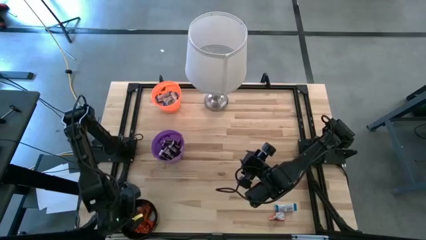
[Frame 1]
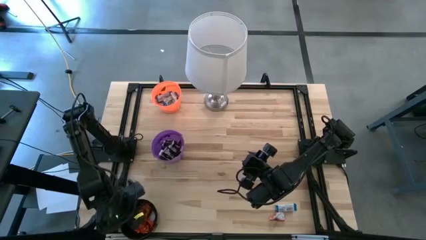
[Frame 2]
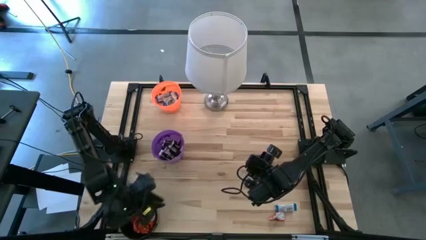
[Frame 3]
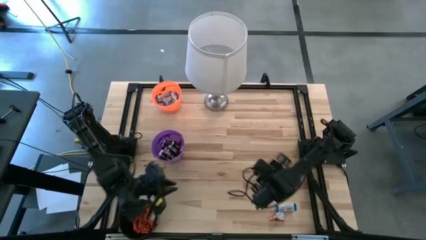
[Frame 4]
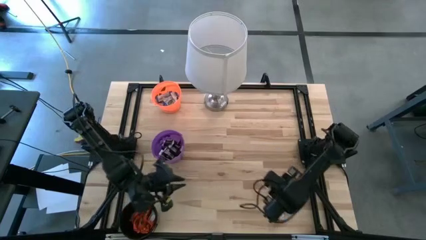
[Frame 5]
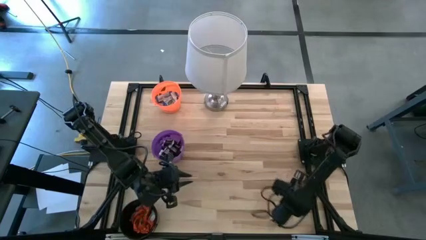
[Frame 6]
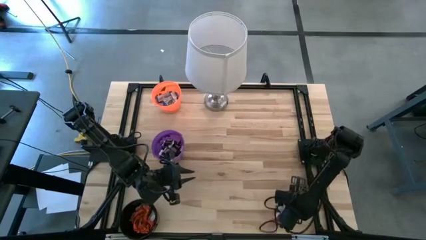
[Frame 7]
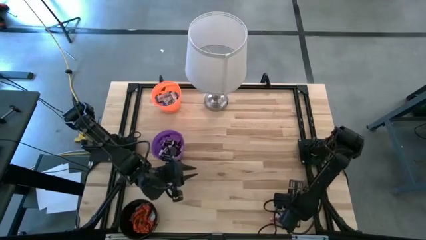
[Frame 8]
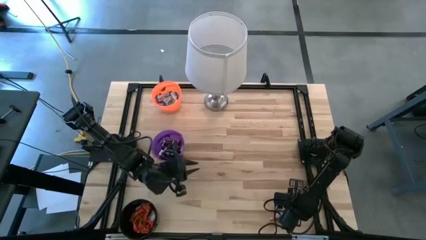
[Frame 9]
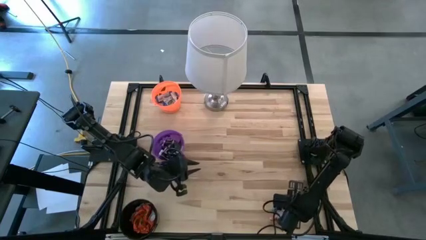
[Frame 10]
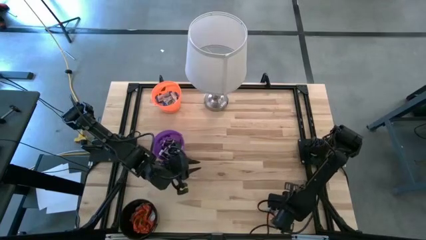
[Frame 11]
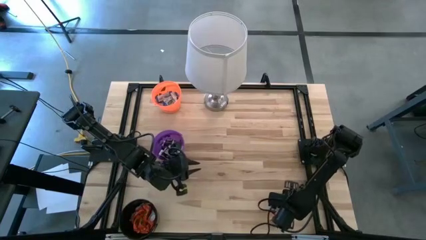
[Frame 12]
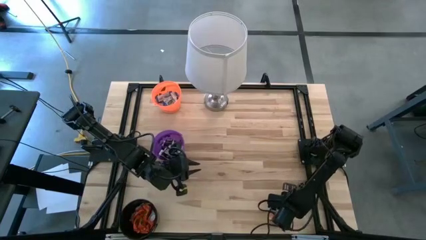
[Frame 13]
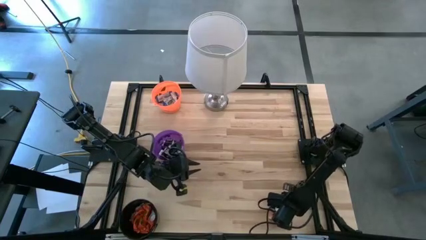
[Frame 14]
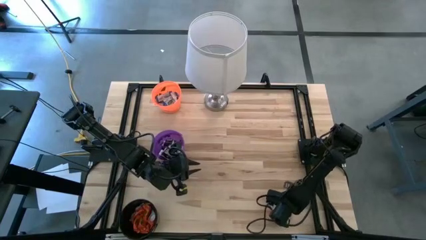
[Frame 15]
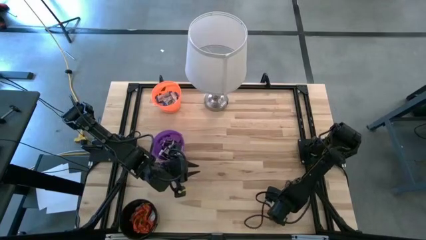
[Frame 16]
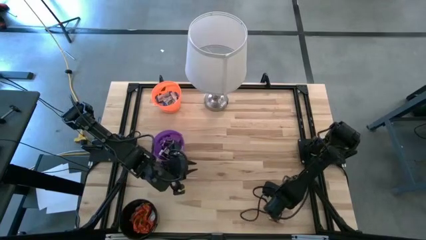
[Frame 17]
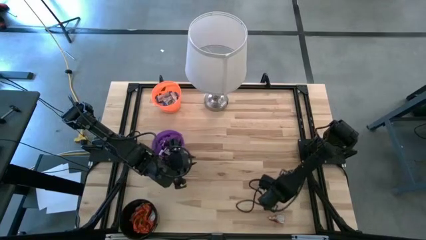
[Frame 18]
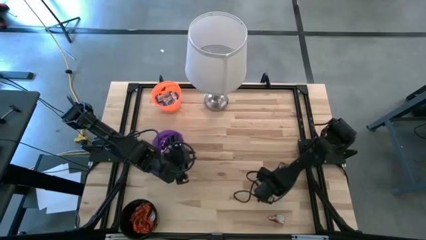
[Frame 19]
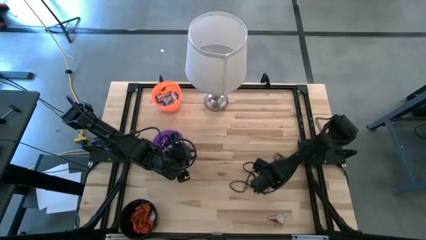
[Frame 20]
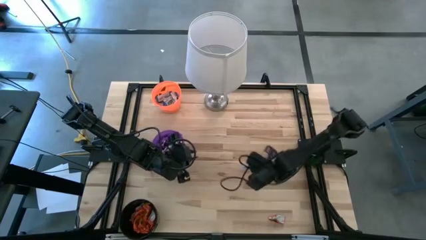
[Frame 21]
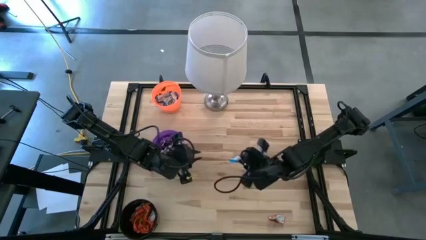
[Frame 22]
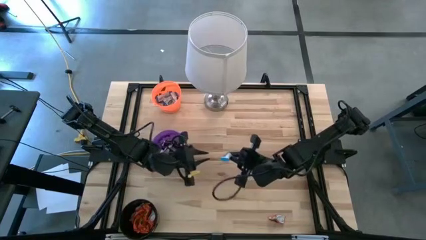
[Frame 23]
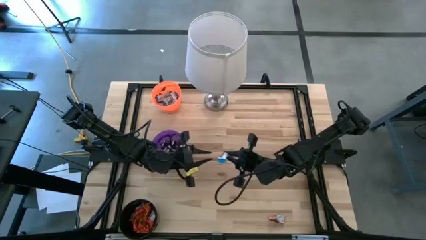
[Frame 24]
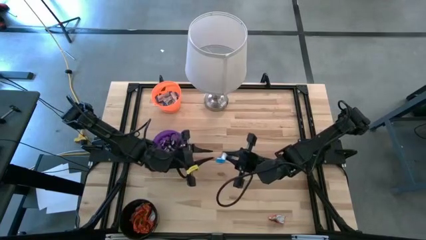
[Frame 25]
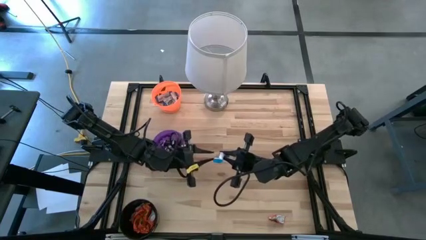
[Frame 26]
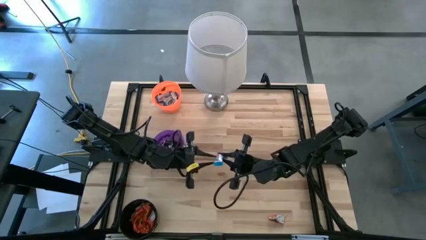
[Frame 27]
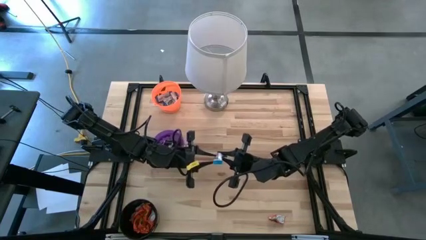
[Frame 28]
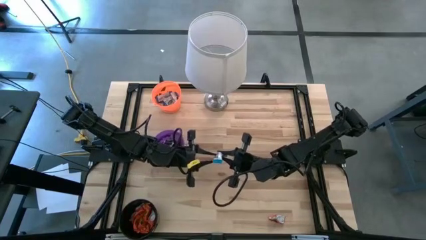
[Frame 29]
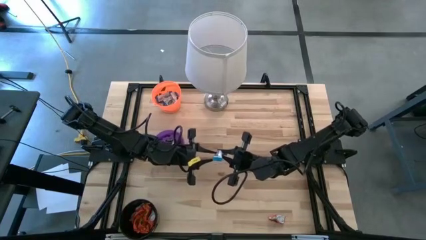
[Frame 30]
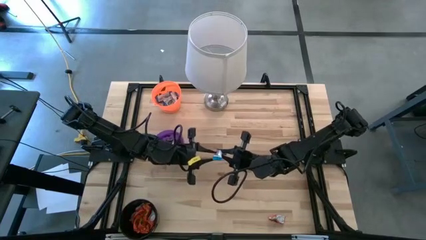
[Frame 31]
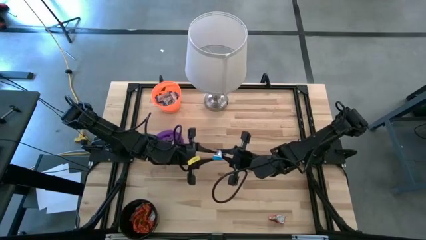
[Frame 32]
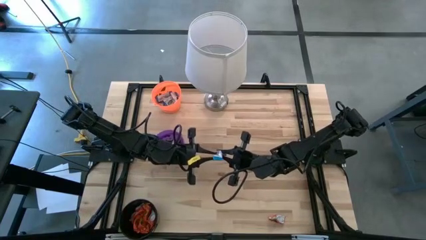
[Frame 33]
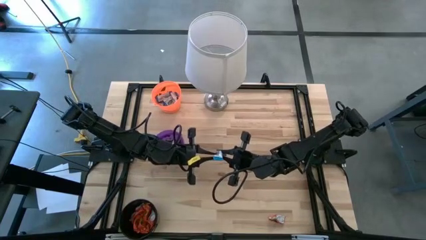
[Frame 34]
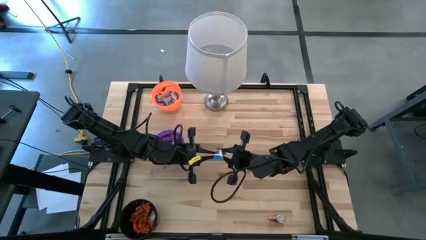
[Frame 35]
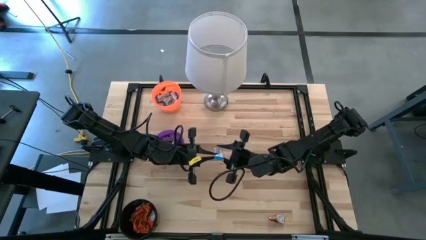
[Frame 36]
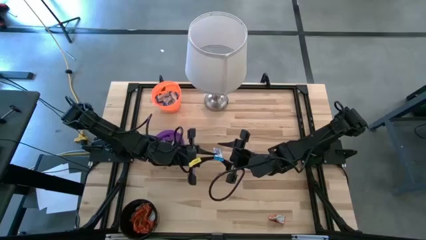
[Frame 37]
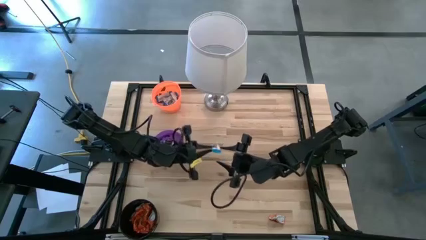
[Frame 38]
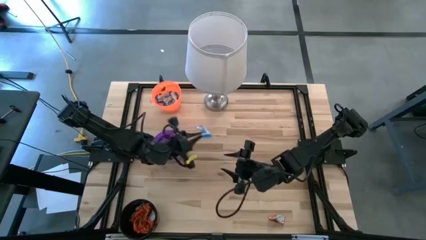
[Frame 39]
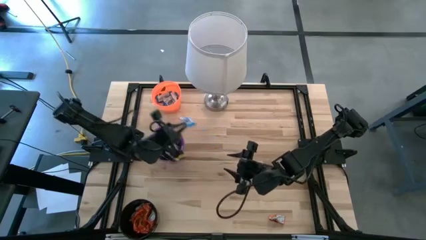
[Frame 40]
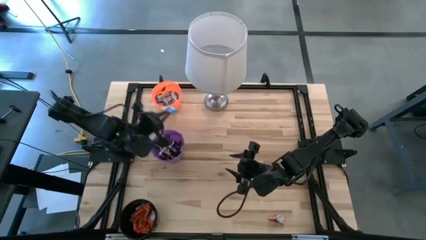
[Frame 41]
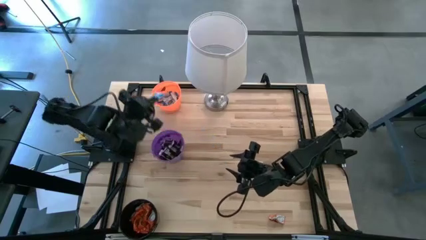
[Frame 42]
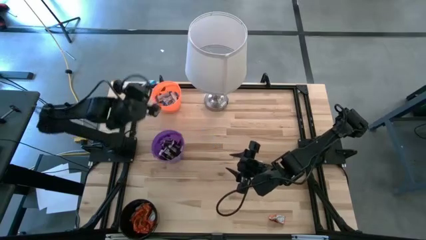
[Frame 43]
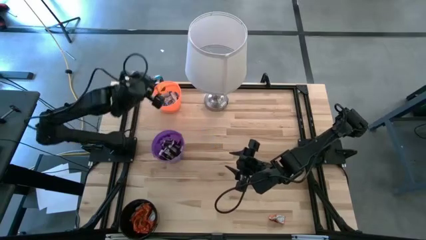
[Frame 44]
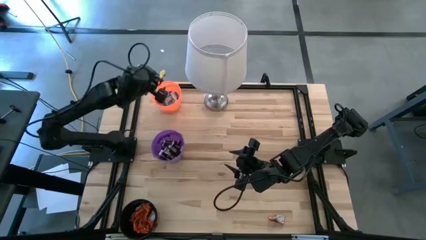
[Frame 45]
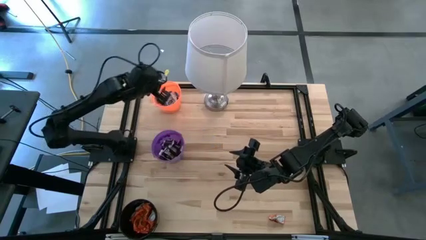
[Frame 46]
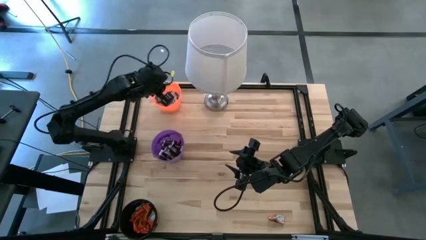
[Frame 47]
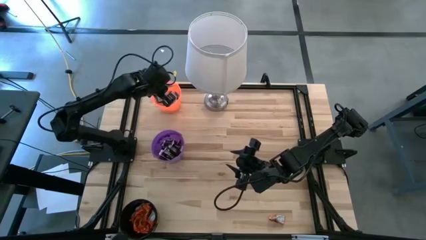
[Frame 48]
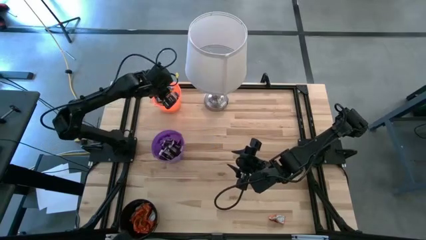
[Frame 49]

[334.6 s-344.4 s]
Task: Sort candy
Put the white chocolate into the orange bucket

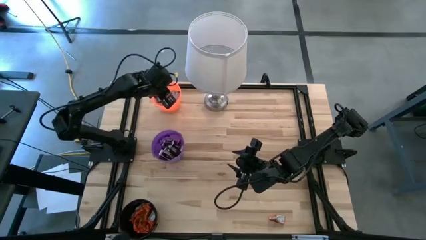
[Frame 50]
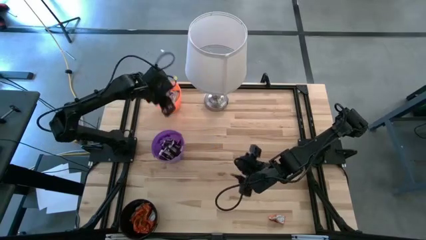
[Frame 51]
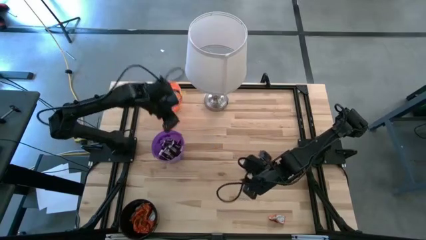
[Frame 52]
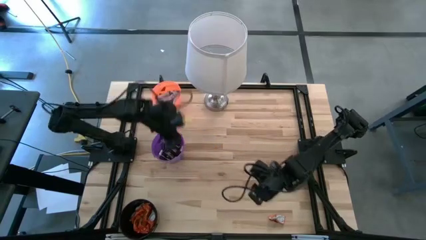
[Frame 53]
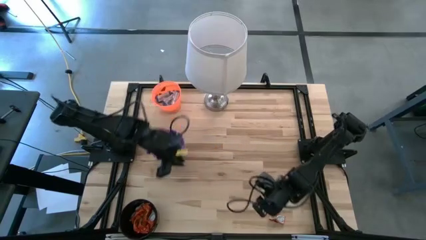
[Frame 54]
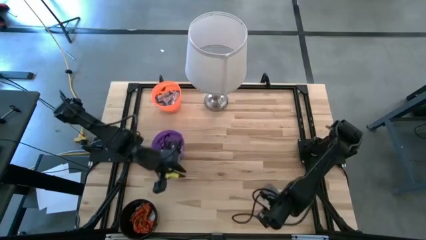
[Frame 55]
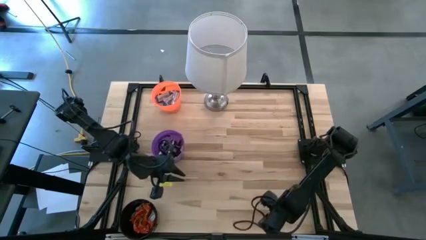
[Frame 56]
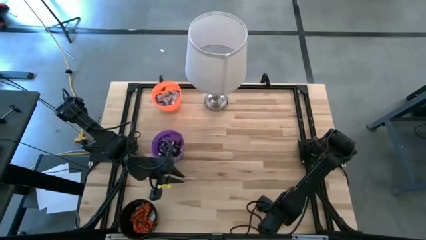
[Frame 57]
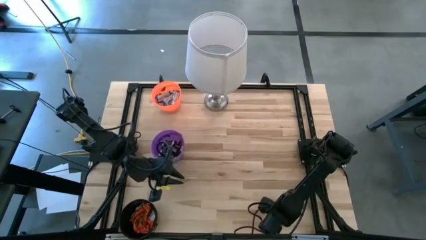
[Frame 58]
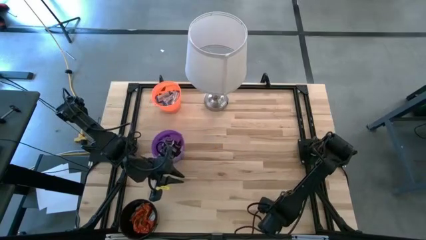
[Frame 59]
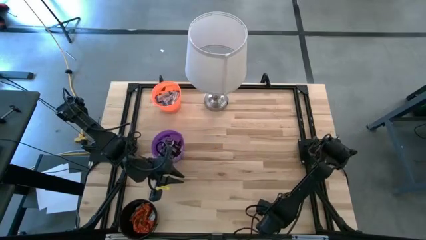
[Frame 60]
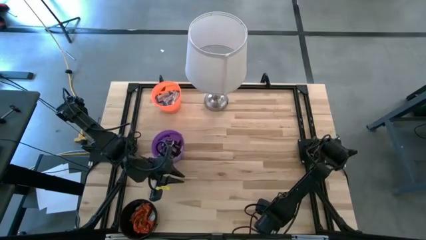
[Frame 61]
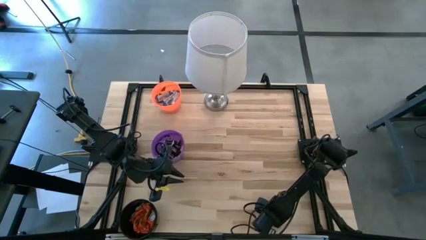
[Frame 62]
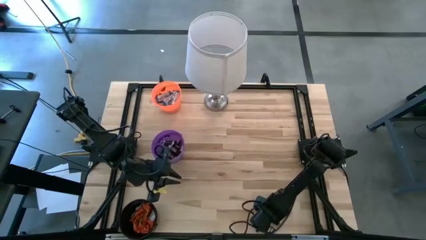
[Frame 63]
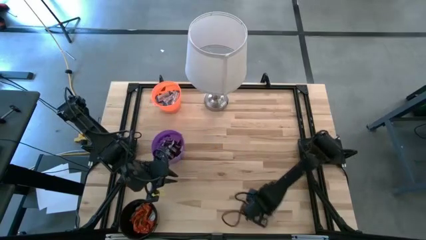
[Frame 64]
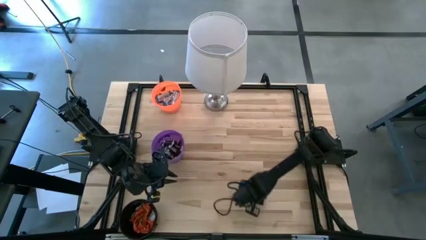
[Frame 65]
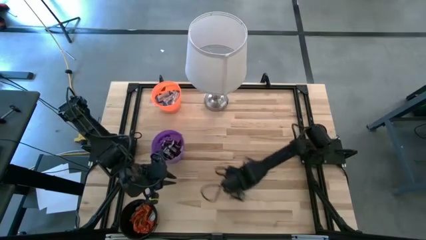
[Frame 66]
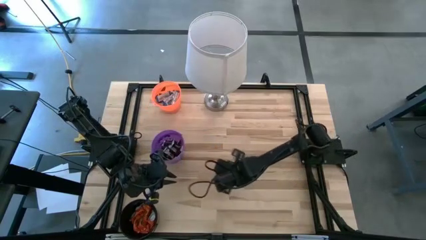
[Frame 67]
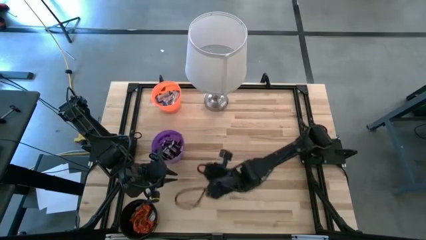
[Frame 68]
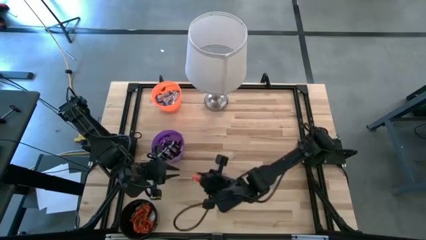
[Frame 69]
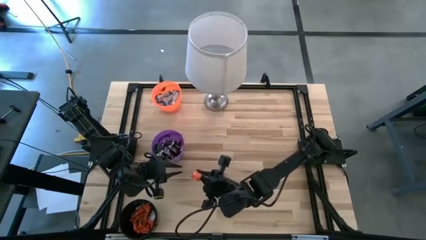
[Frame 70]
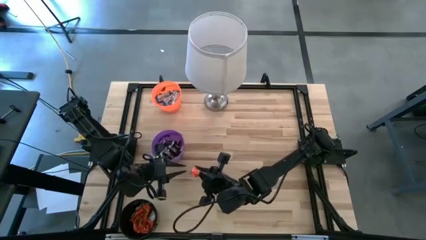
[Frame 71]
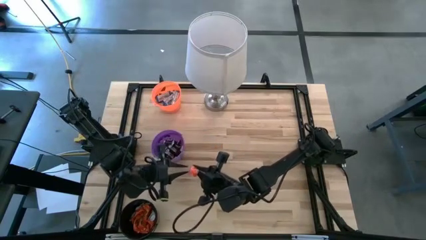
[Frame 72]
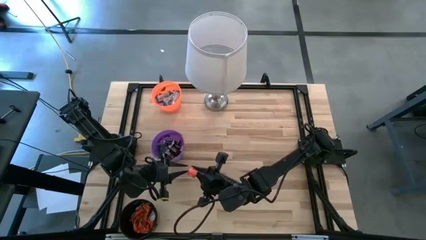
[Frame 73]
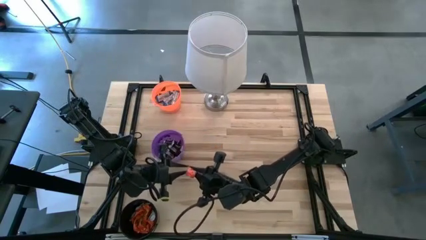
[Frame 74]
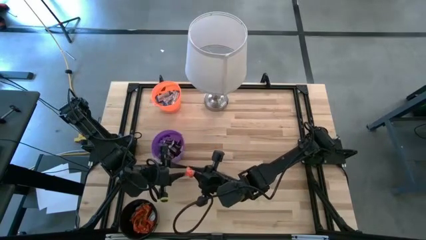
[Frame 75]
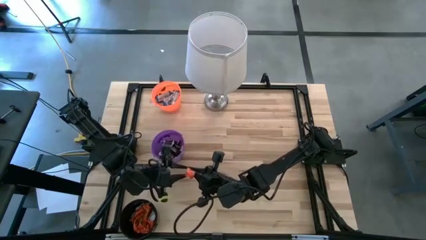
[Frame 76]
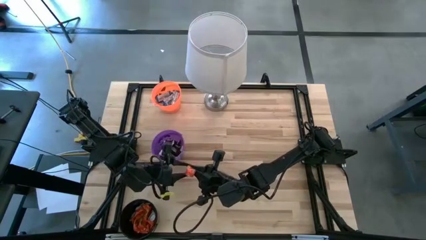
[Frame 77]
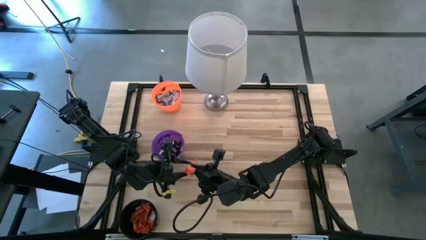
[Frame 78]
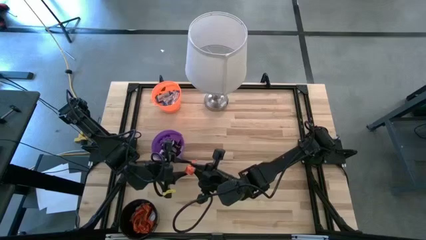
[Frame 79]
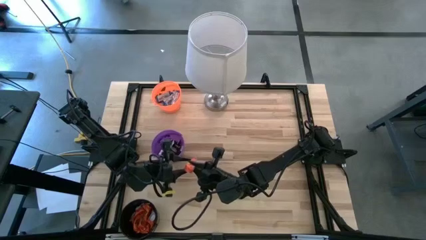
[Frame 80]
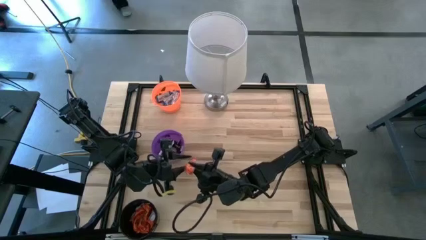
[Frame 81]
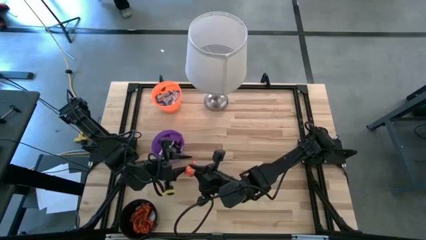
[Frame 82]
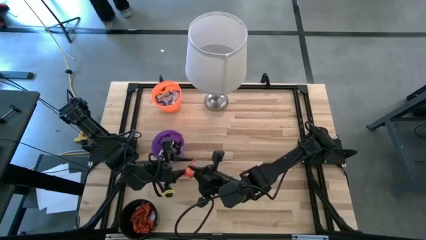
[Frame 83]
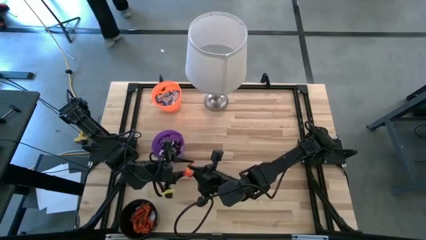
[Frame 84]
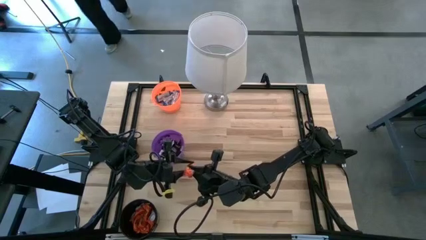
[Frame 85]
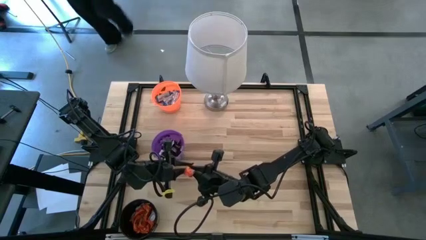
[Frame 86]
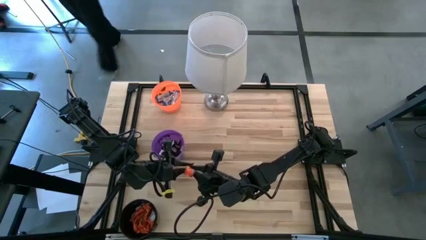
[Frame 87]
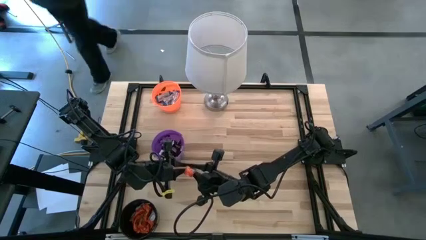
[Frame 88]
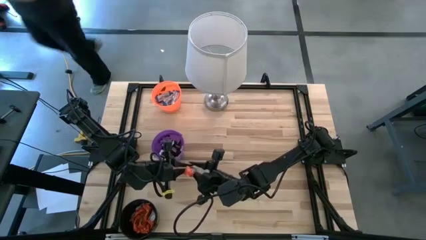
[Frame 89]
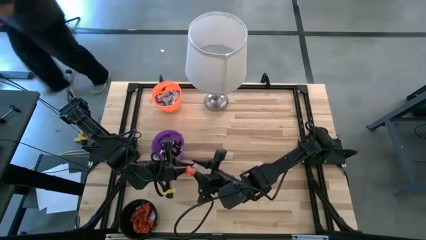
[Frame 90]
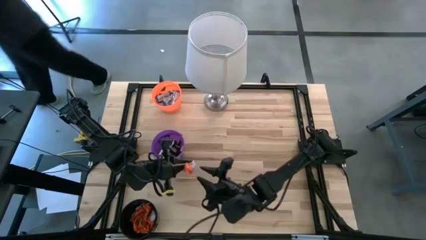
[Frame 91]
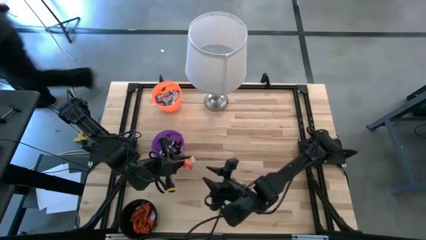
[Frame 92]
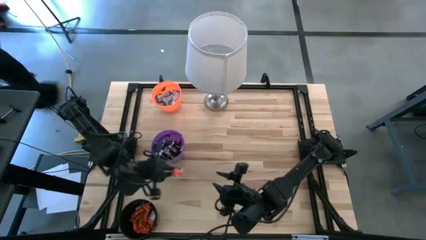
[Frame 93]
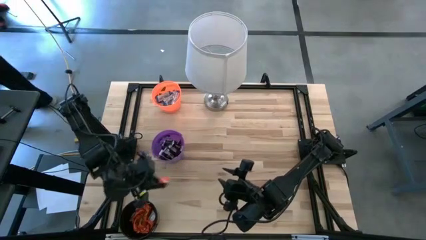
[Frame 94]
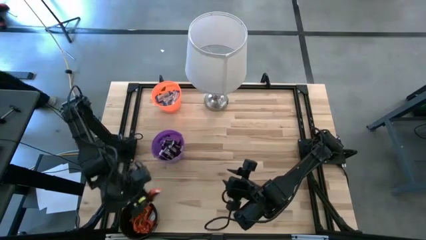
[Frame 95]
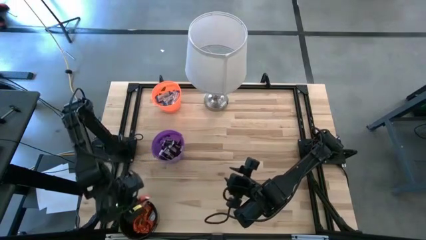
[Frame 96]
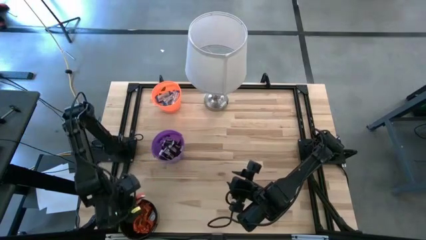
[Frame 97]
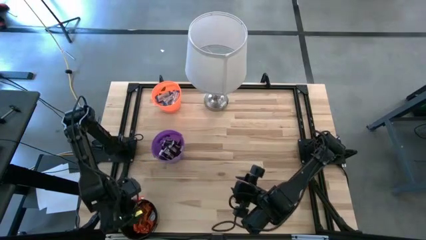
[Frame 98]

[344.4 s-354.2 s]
Put the orange chocolate into the black bucket
